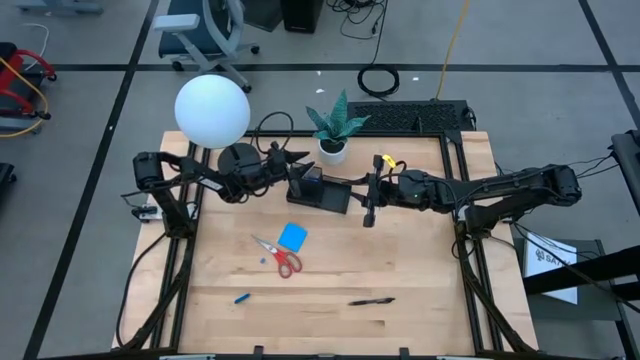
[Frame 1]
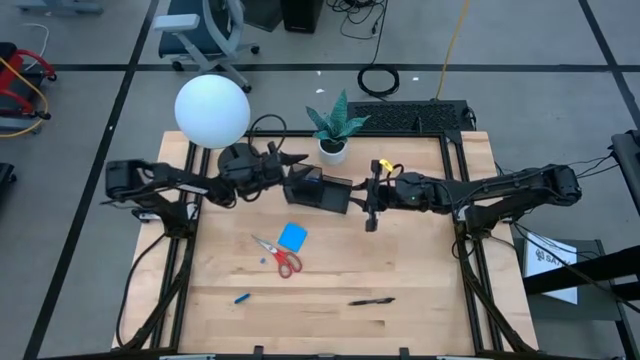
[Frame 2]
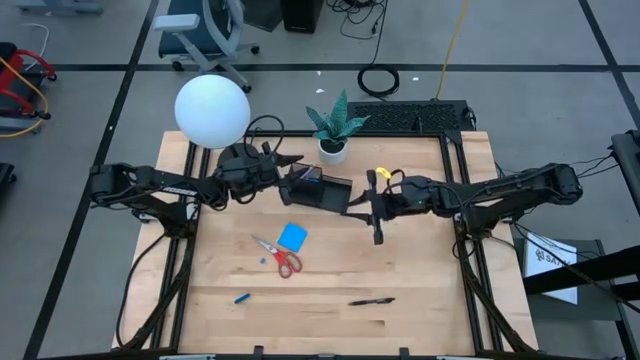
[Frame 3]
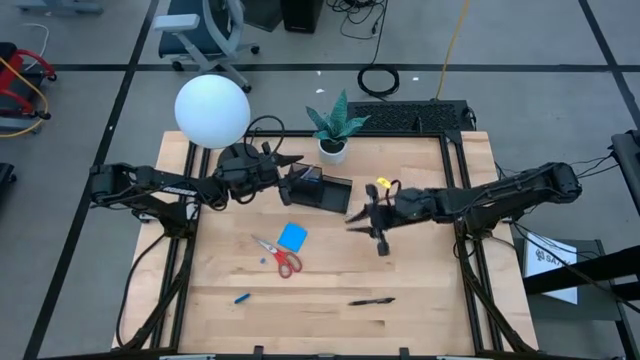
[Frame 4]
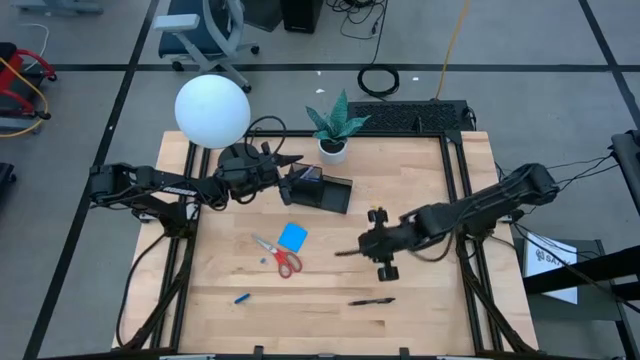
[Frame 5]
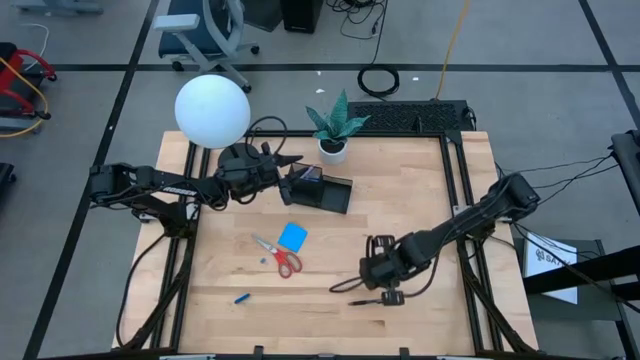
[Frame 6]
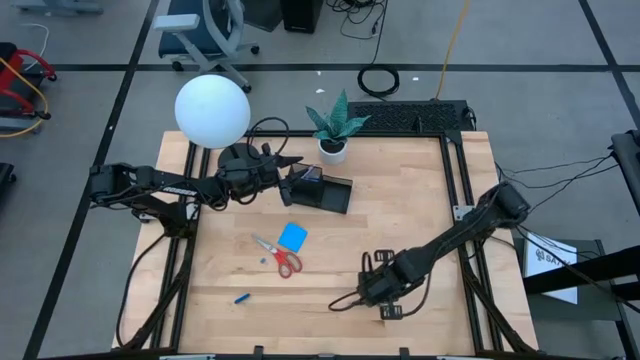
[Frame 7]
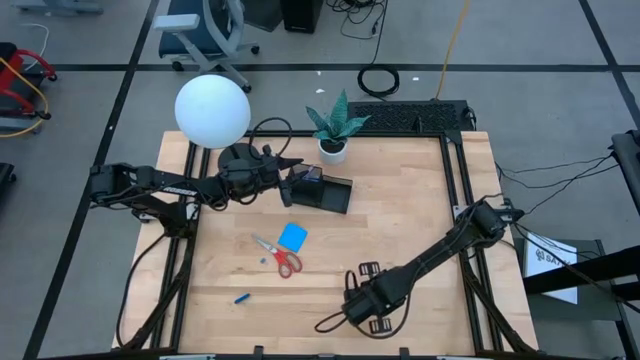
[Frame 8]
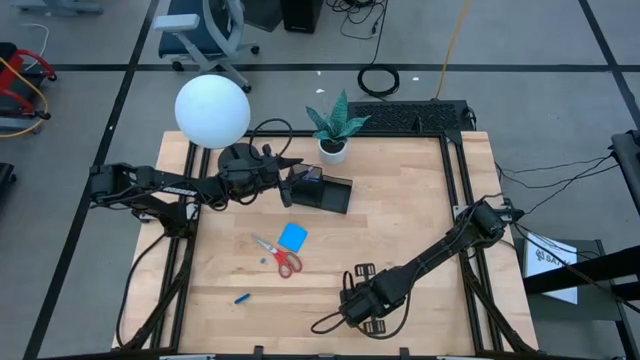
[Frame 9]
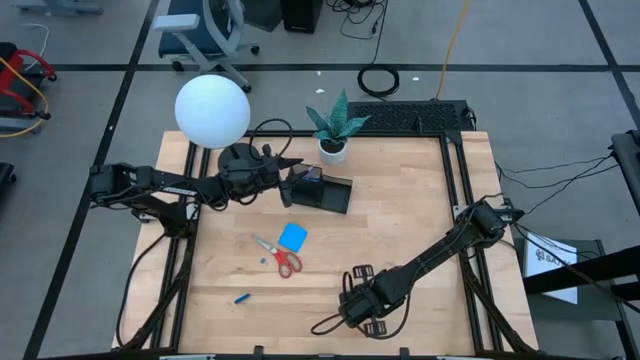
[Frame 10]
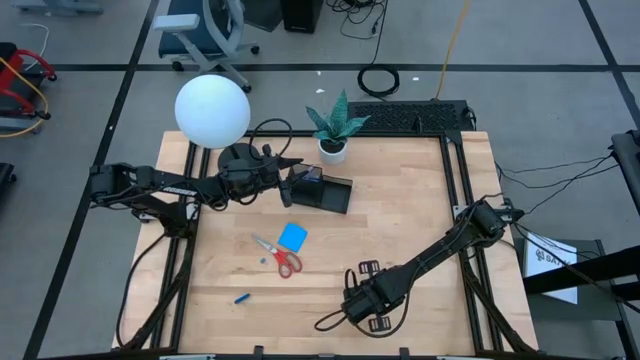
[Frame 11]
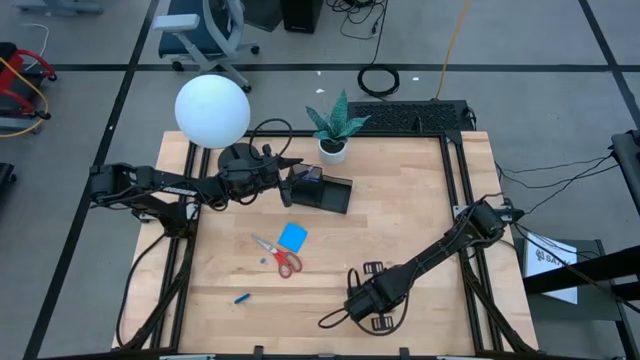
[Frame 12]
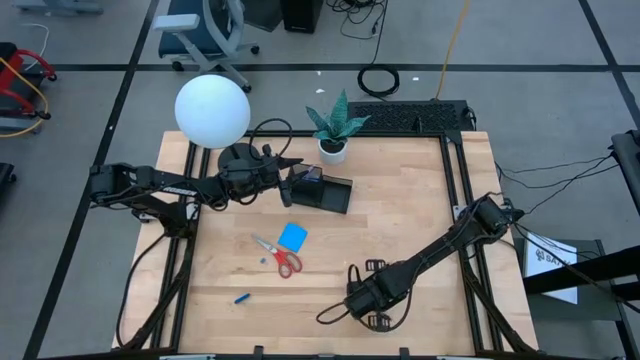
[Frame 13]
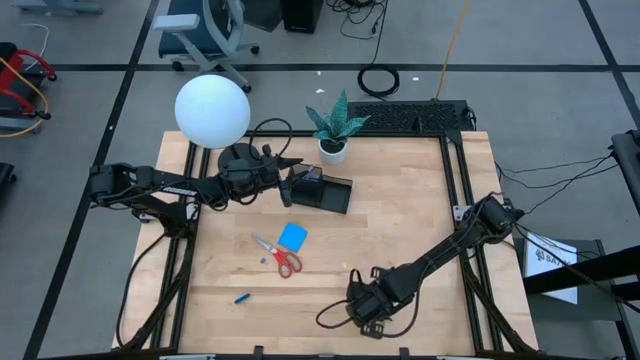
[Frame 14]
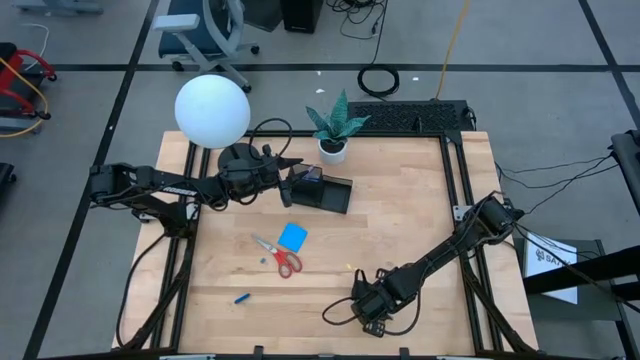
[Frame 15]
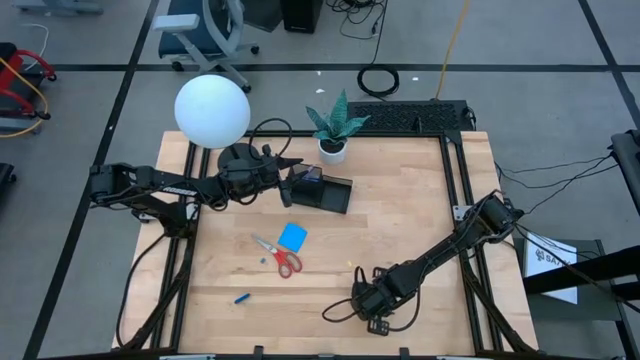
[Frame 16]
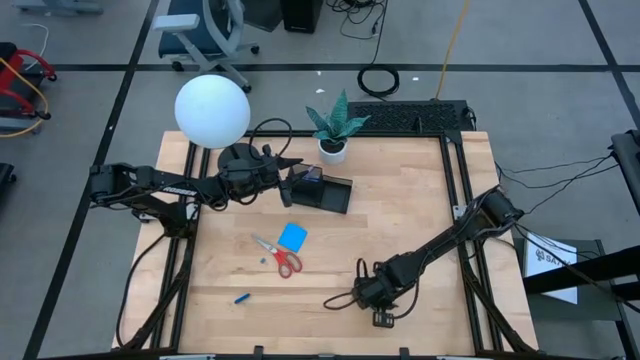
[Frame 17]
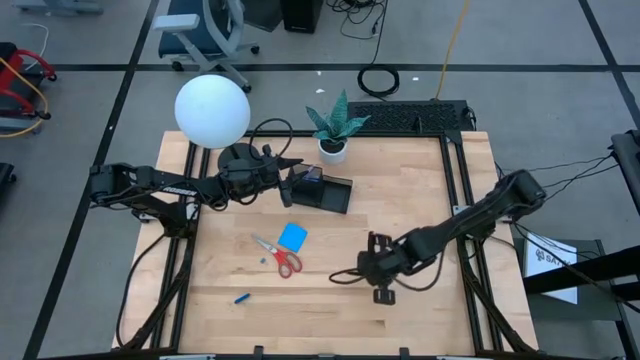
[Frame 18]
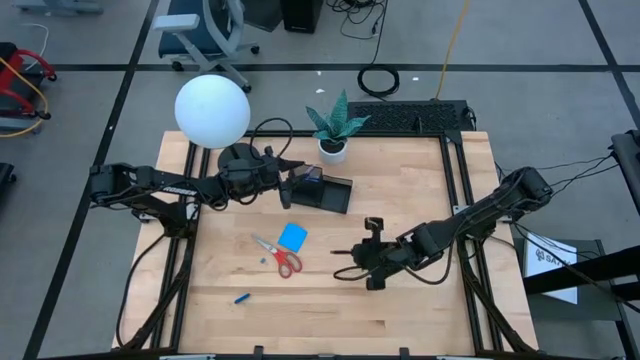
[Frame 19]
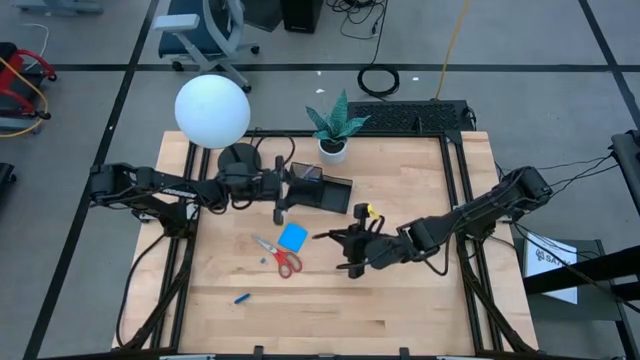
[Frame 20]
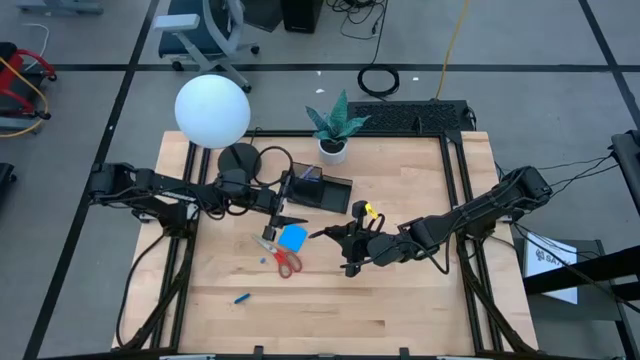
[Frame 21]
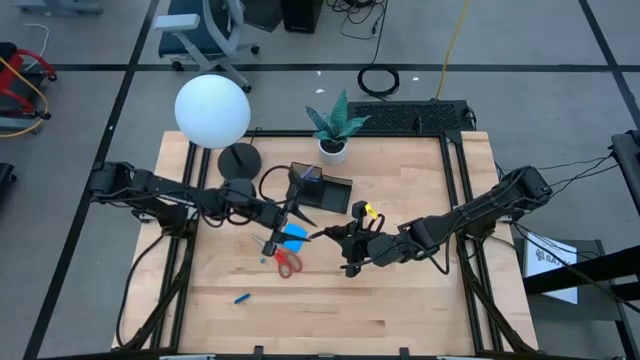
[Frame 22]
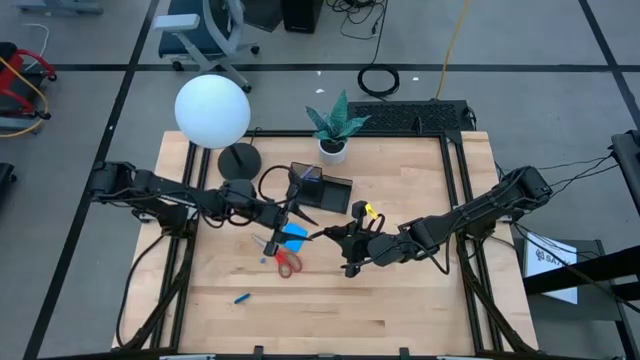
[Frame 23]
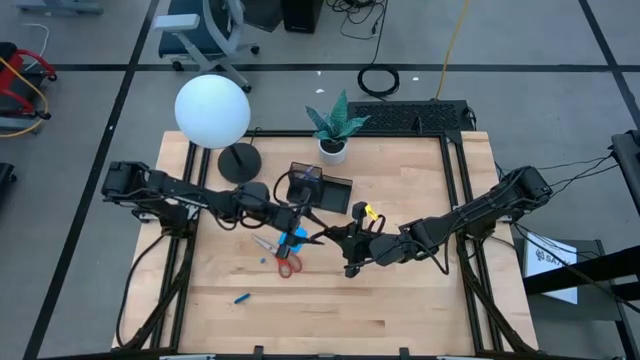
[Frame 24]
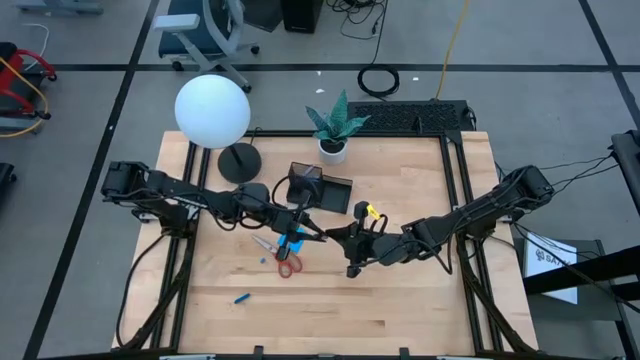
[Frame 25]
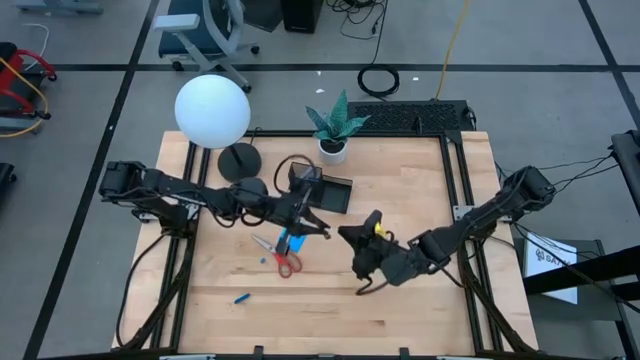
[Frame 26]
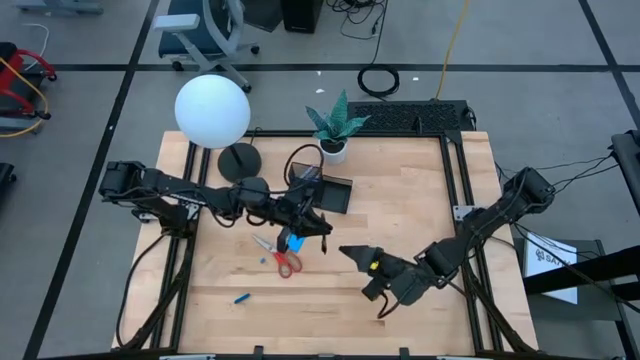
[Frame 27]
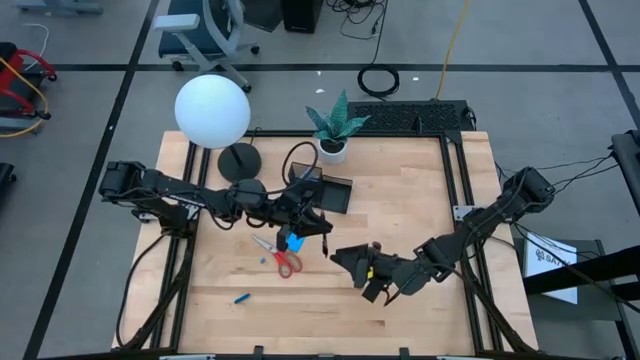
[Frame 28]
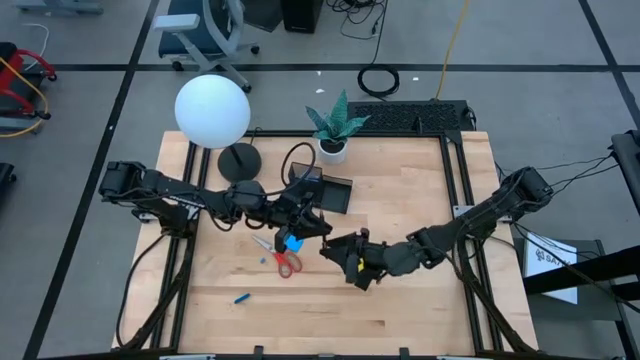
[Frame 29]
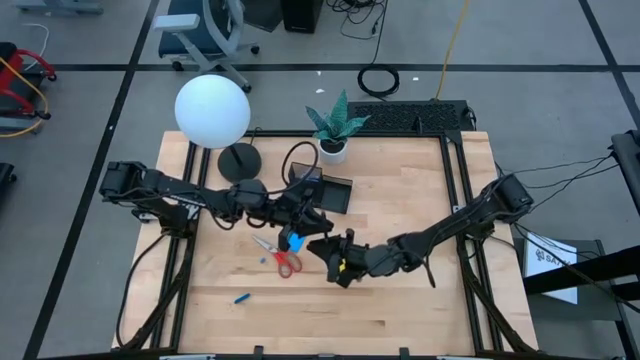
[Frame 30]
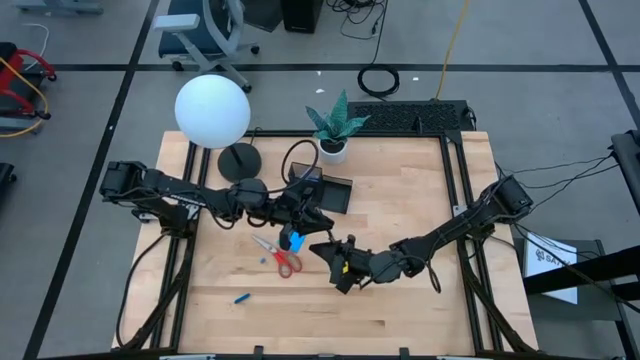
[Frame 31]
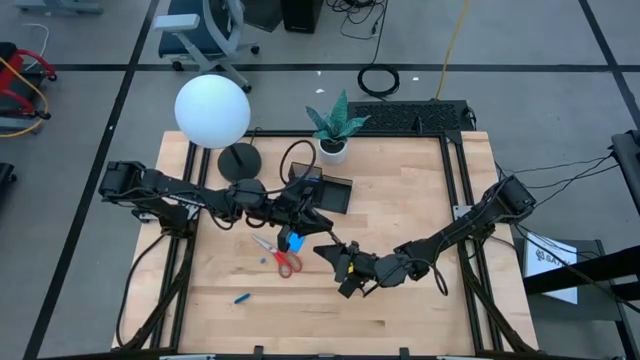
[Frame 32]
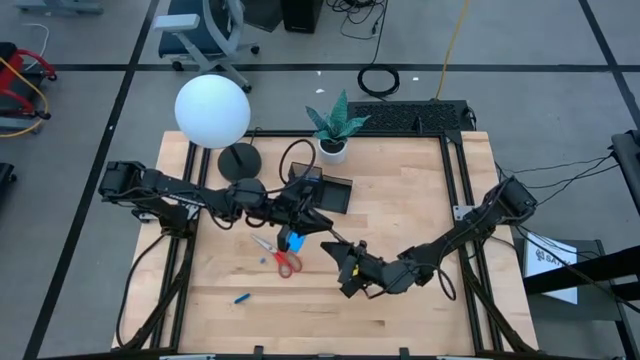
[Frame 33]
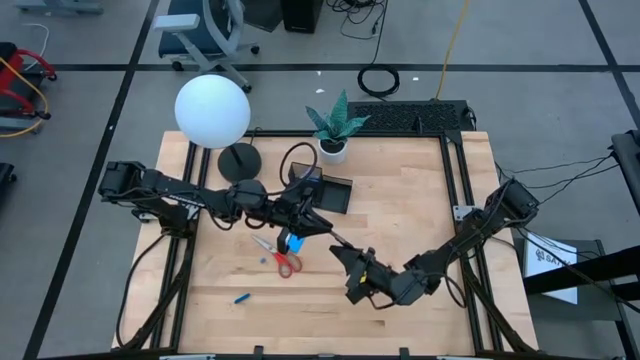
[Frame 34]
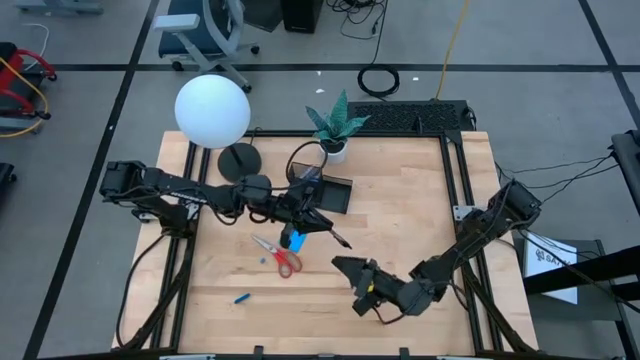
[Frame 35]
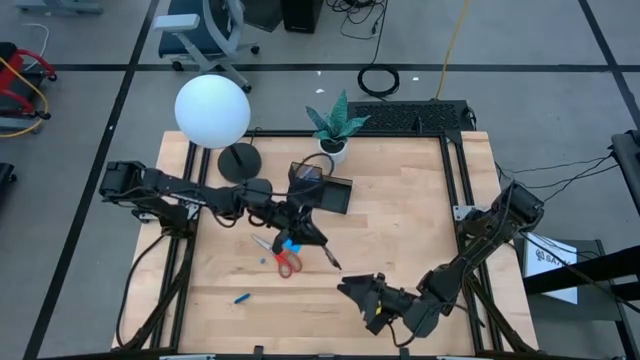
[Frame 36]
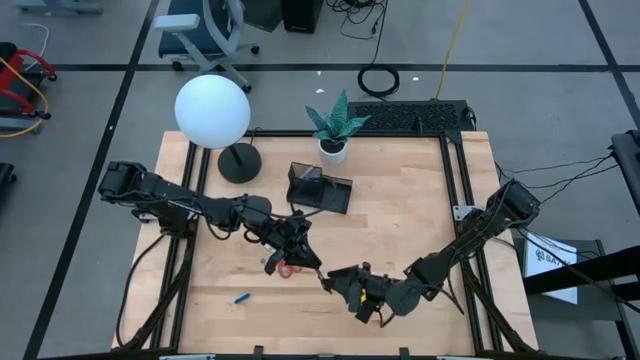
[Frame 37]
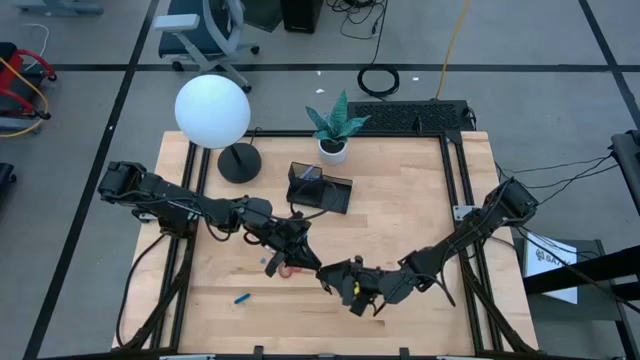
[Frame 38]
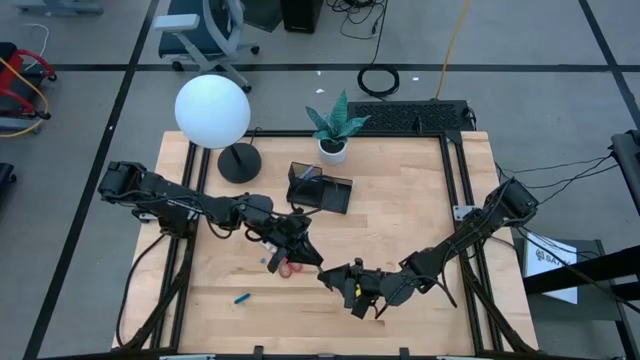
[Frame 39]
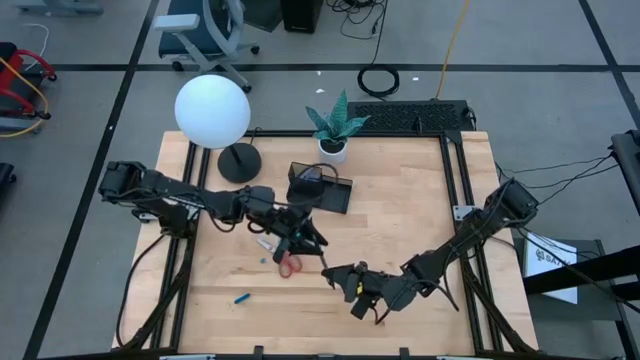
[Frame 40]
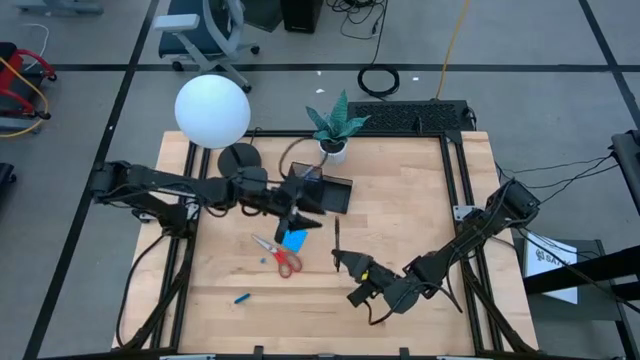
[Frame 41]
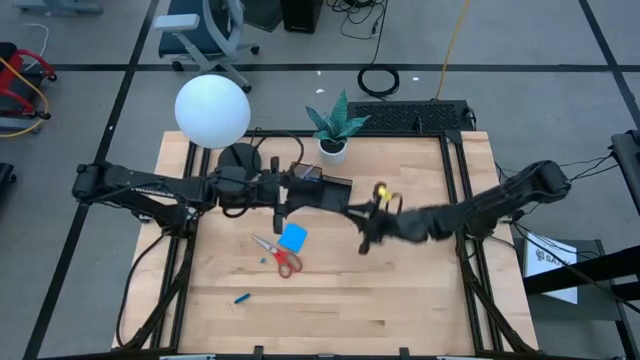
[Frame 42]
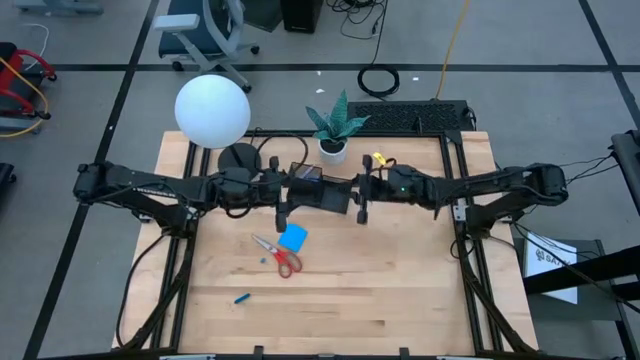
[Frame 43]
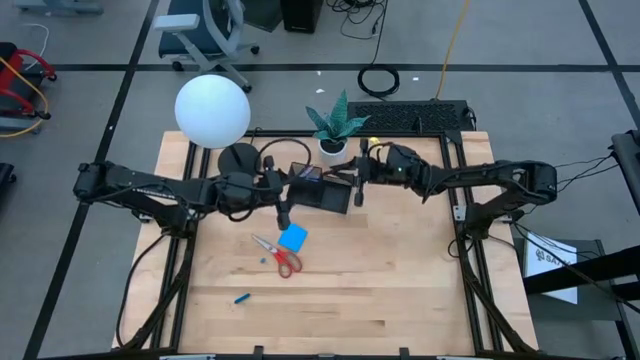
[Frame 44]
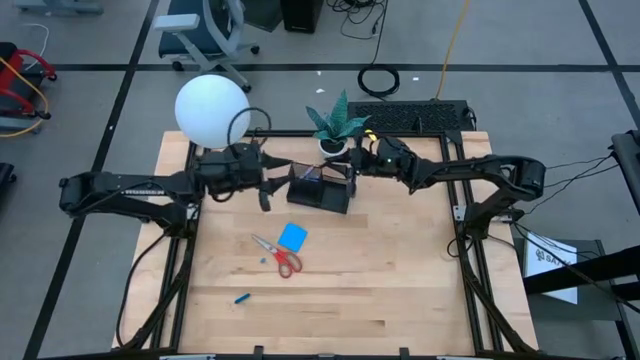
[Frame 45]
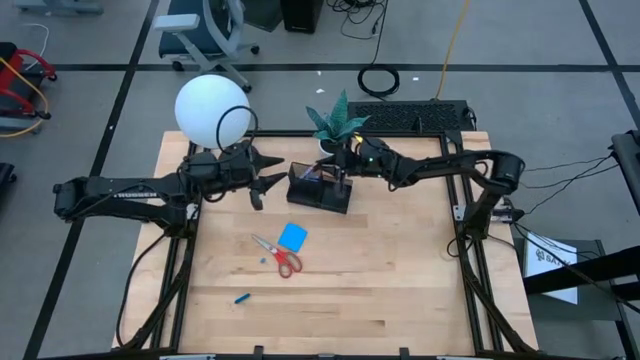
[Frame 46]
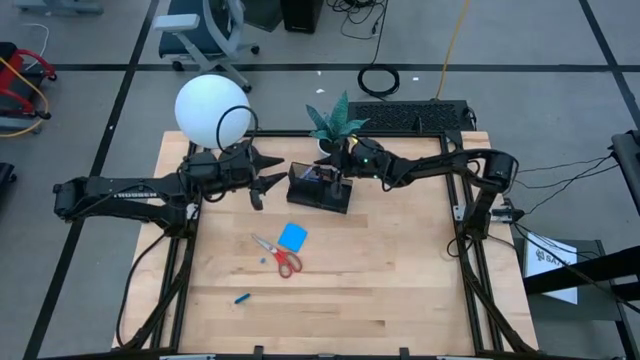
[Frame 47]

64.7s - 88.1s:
Task: Pick and place office supplies into organizer
Put the black pen into the desk organizer
